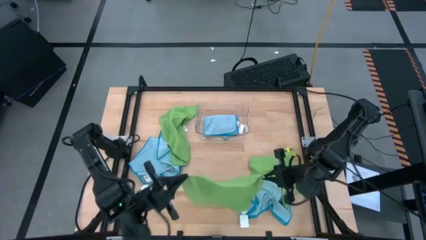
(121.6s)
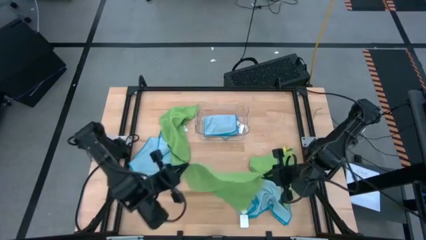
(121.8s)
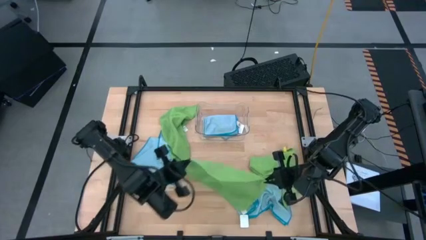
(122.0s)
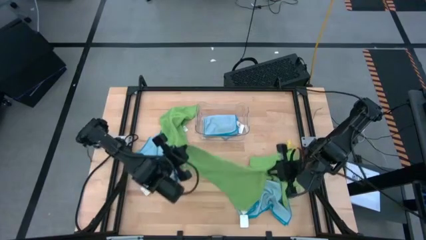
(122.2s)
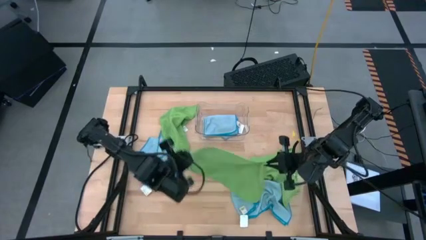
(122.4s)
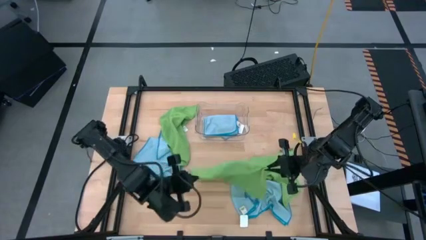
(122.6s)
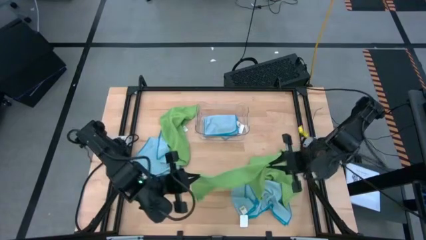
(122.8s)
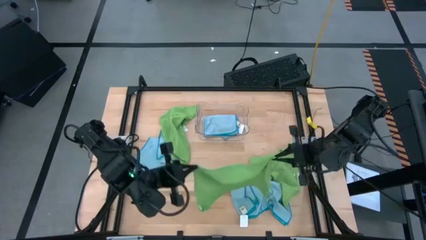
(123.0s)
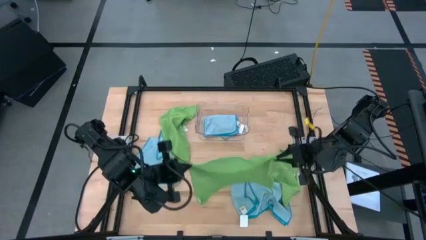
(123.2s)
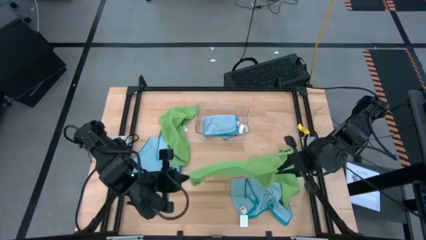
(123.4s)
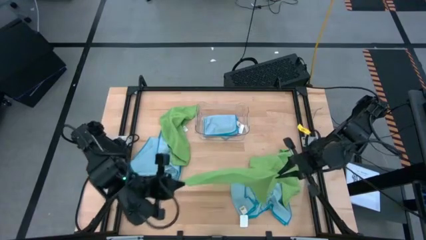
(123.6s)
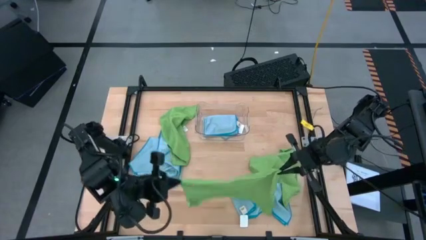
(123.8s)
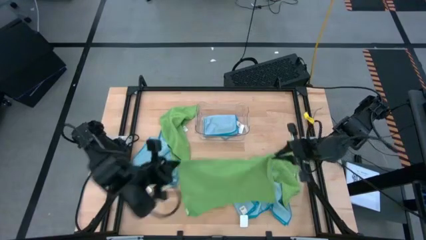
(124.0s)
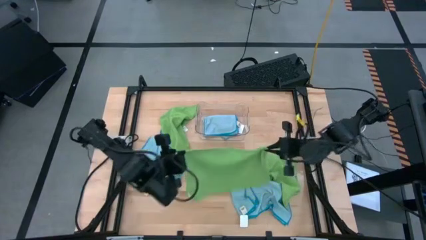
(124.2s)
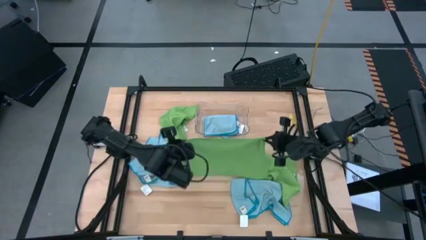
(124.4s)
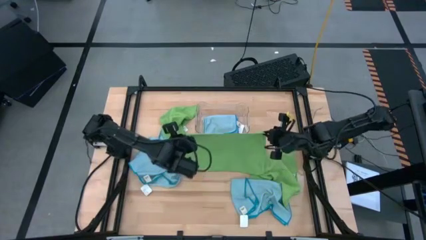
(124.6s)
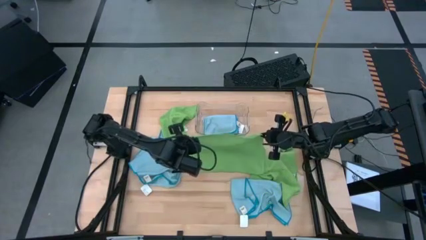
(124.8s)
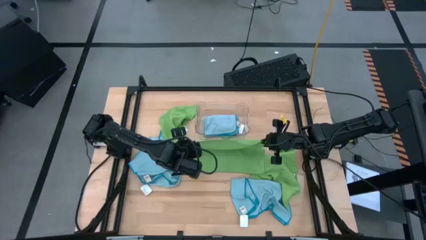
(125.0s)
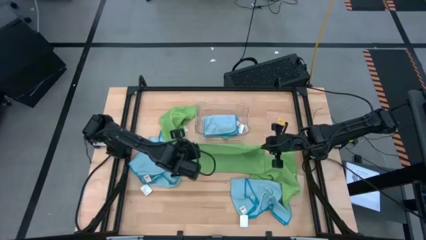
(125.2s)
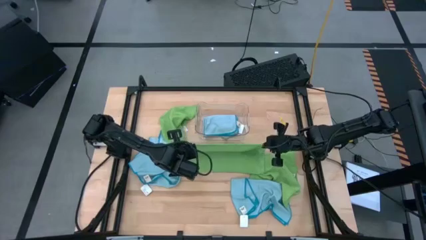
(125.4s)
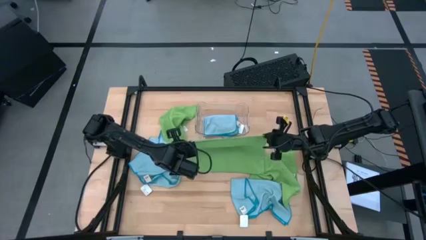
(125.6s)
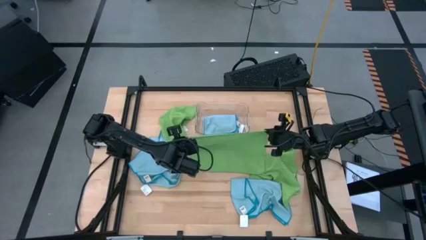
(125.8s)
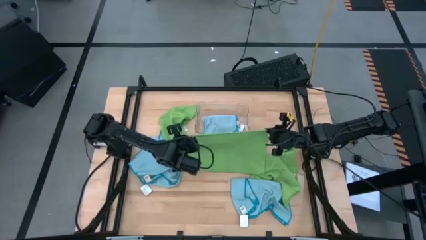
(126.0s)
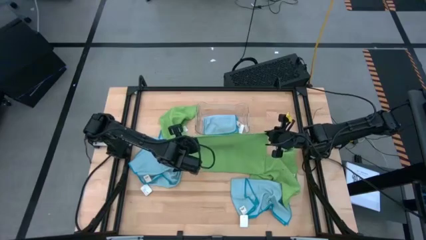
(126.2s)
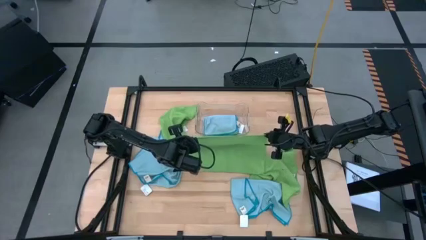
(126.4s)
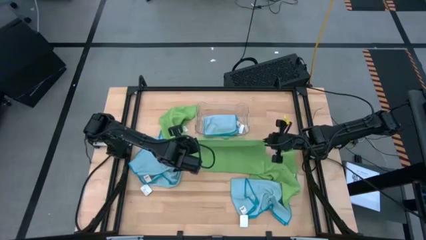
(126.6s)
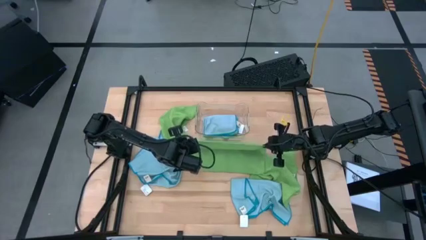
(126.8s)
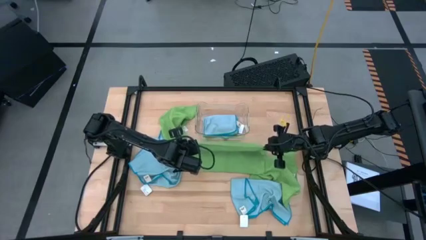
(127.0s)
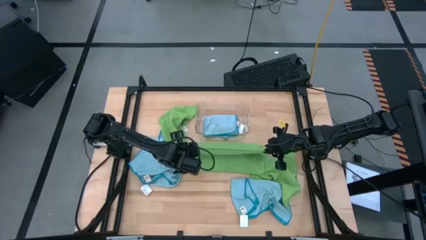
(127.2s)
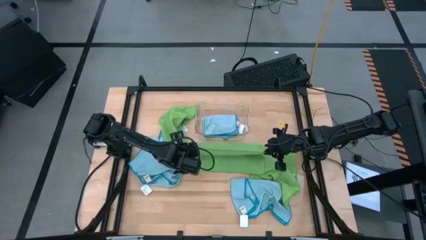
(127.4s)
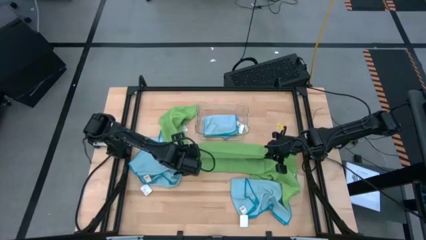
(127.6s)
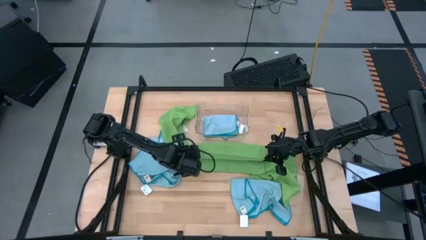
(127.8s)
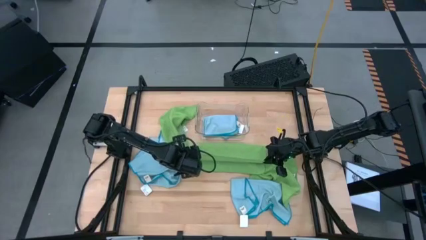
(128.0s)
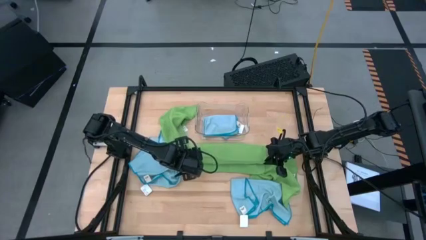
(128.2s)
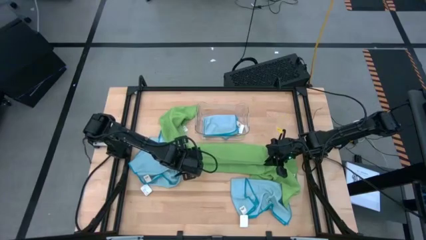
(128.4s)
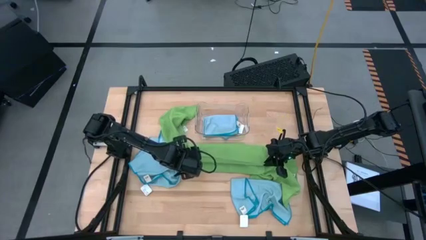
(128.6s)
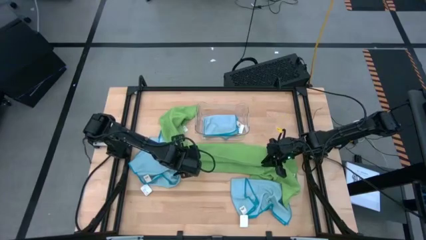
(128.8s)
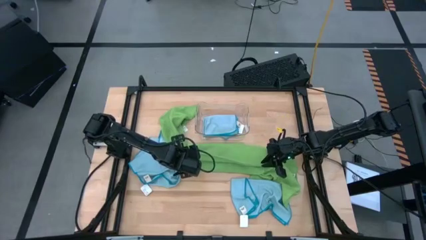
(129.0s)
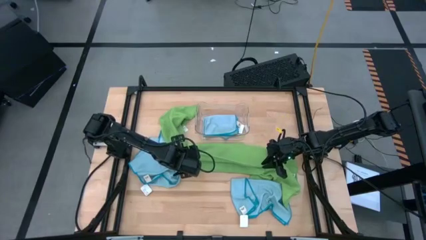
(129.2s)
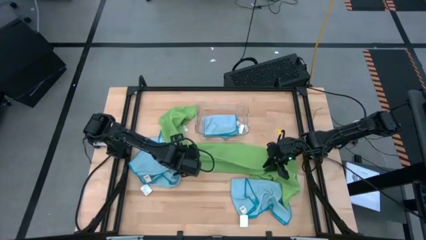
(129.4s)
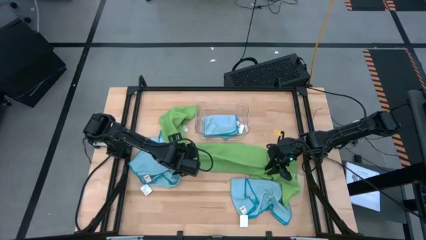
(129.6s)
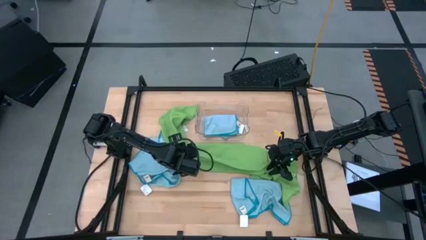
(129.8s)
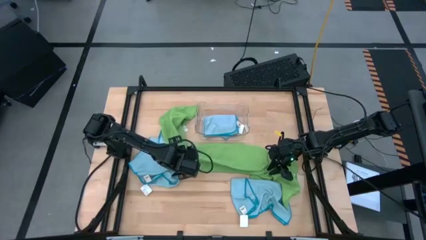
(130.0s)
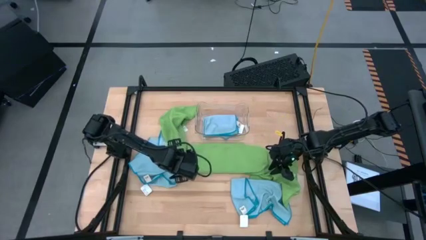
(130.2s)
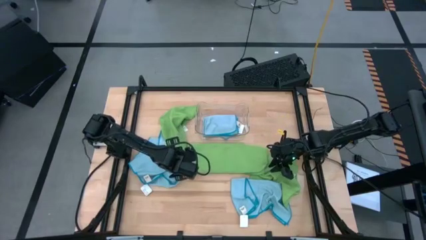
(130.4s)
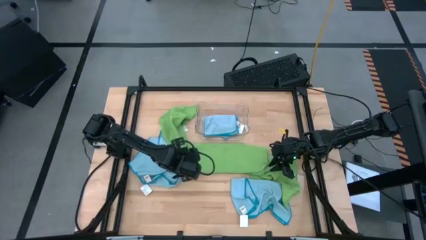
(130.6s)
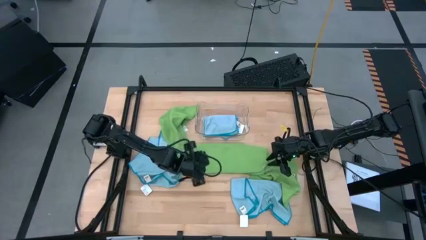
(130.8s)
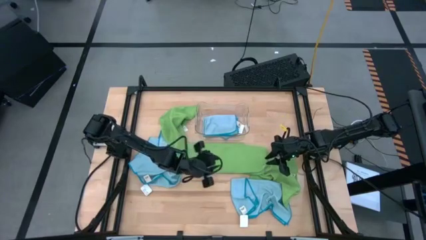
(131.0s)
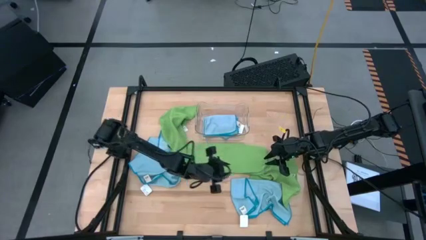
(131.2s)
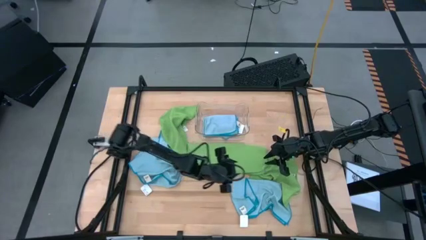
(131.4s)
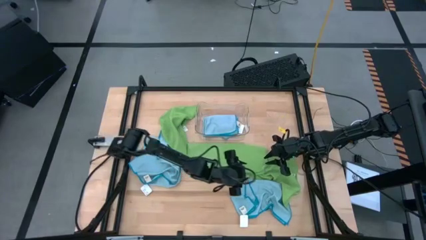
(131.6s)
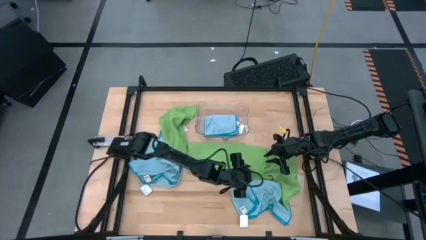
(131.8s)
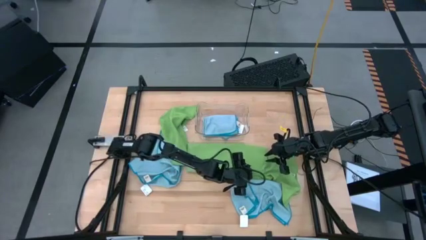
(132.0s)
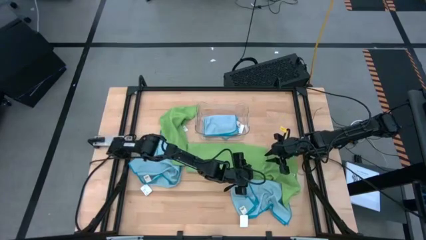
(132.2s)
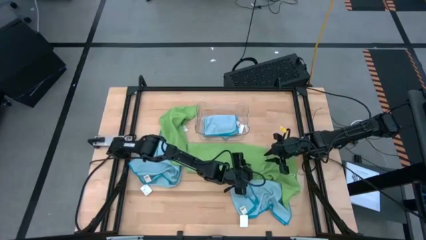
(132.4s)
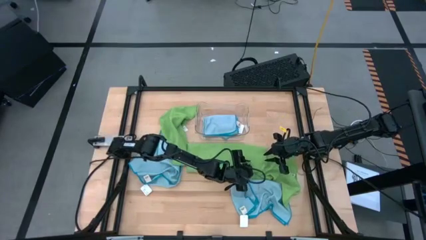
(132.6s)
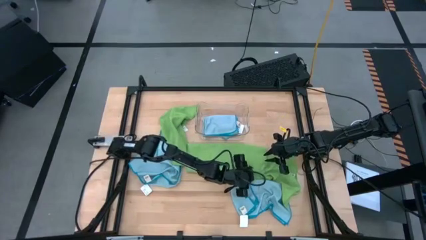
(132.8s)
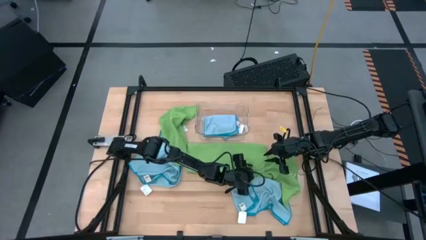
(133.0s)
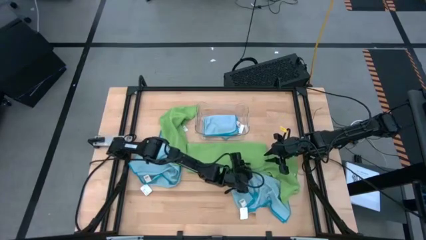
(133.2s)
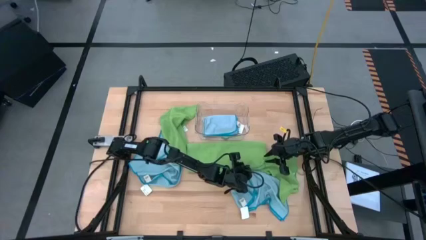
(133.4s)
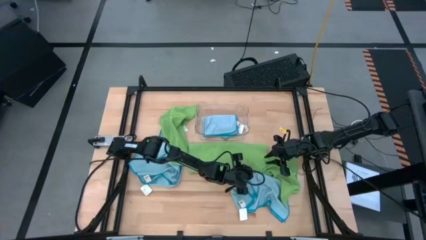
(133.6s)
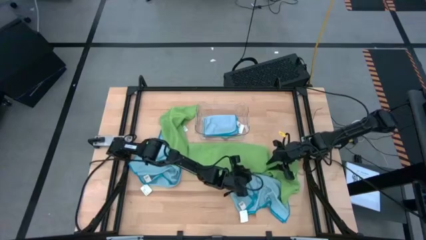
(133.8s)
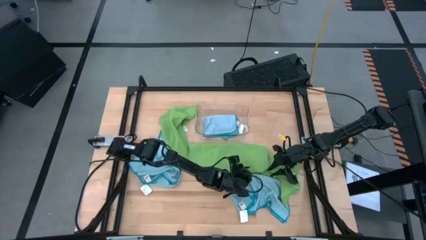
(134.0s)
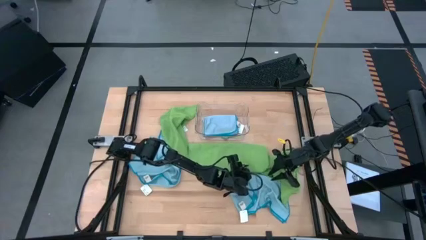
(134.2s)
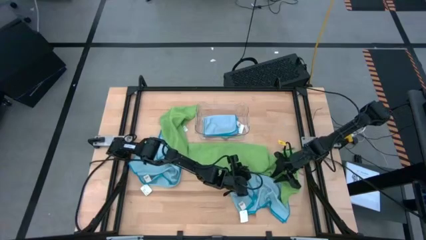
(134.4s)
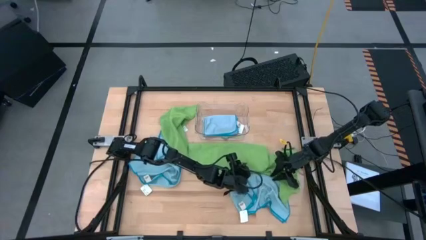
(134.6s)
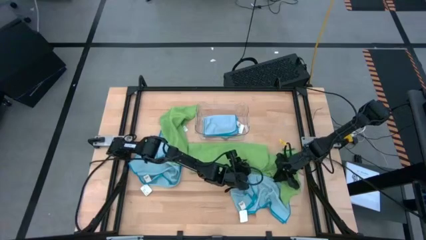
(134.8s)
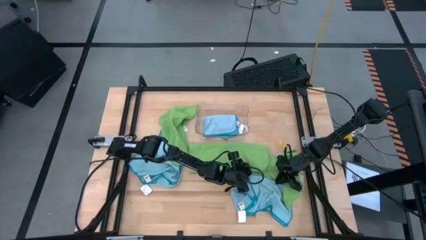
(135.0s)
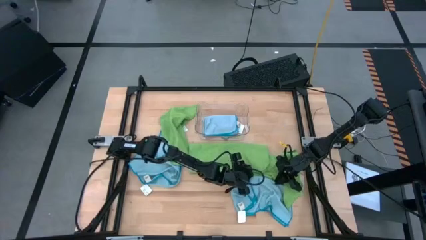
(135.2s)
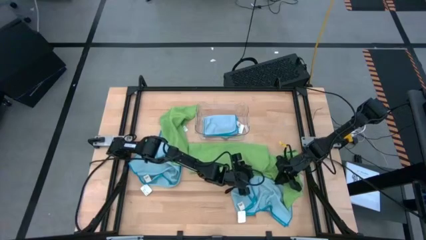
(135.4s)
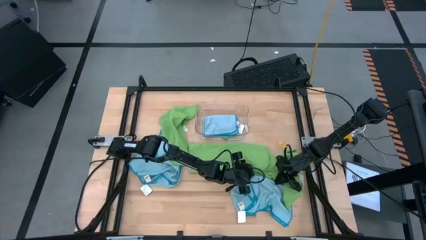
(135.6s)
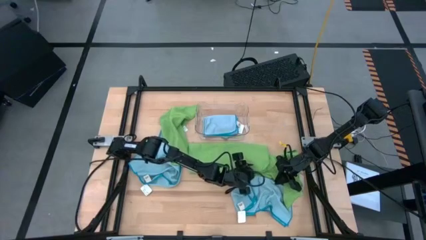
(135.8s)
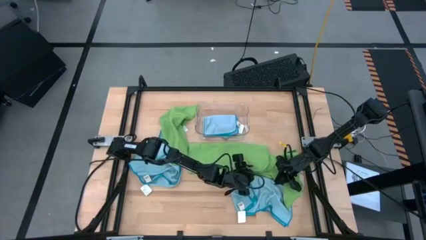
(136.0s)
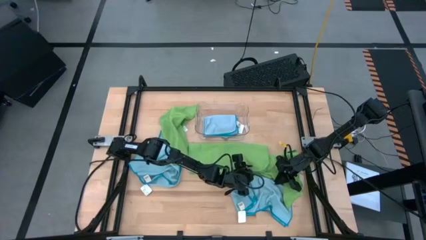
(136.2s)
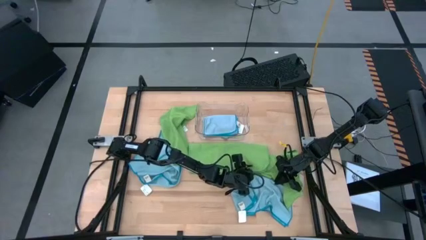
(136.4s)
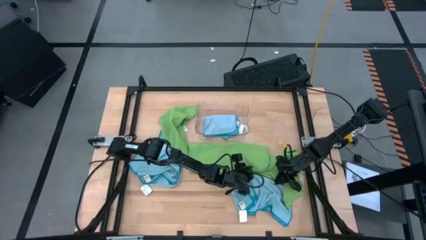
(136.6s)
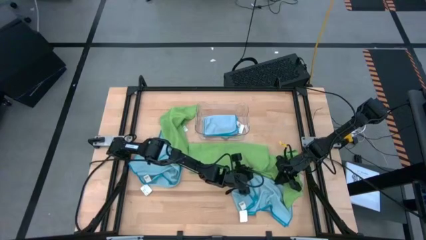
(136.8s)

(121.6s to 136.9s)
Task: Fold microfiber towels
Fold the bottom left green microfiber cloth
